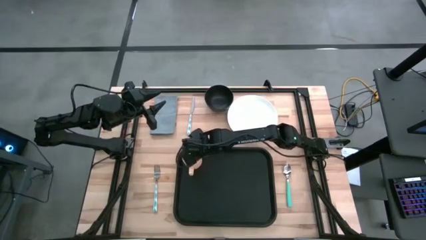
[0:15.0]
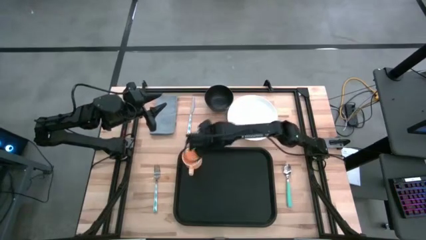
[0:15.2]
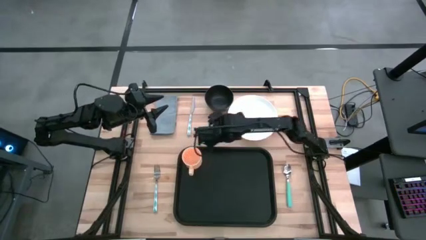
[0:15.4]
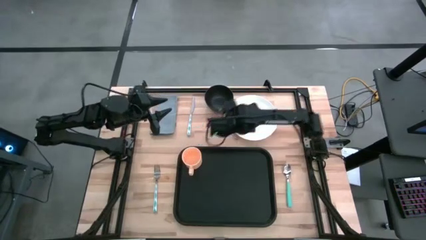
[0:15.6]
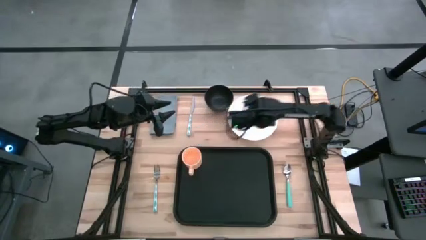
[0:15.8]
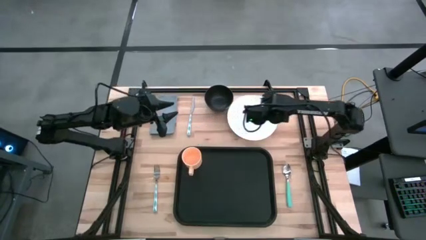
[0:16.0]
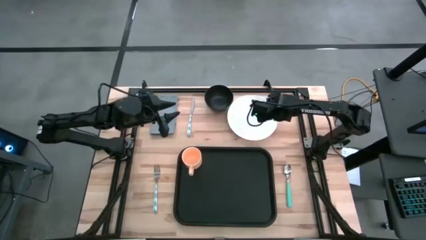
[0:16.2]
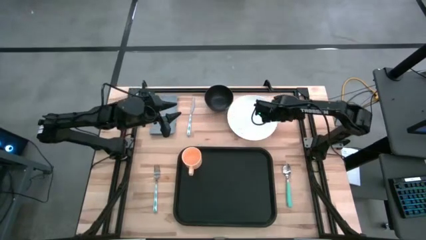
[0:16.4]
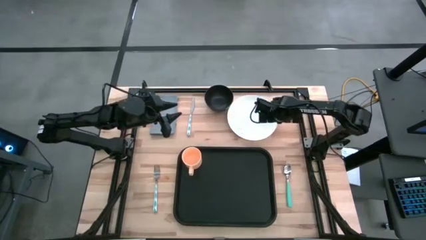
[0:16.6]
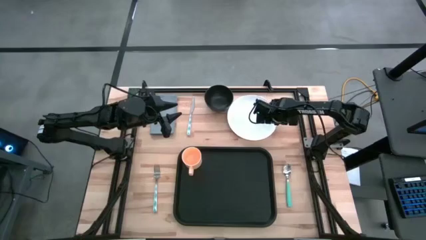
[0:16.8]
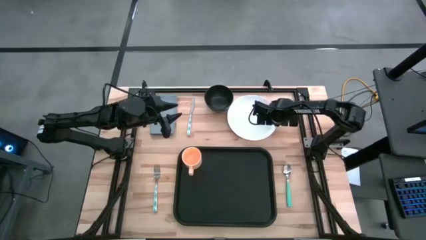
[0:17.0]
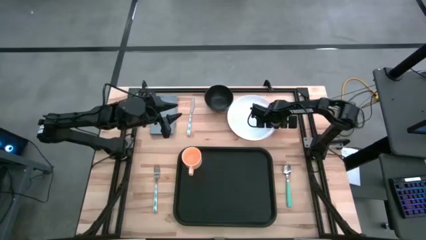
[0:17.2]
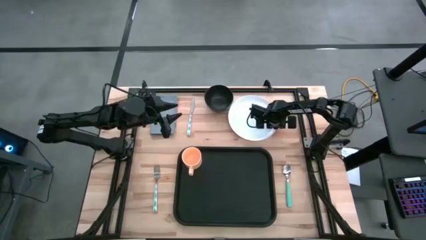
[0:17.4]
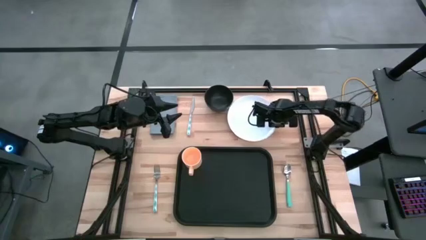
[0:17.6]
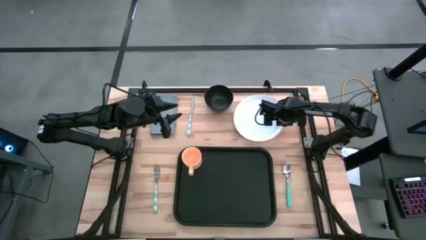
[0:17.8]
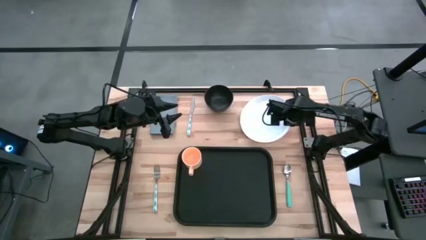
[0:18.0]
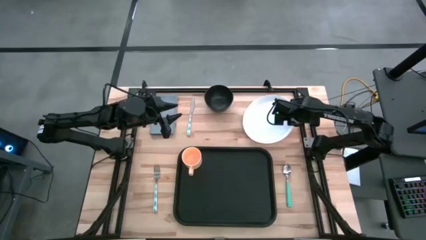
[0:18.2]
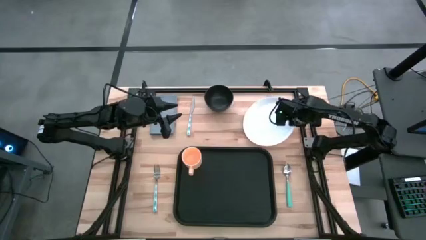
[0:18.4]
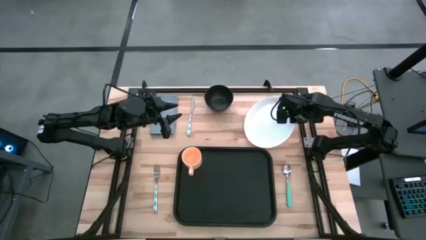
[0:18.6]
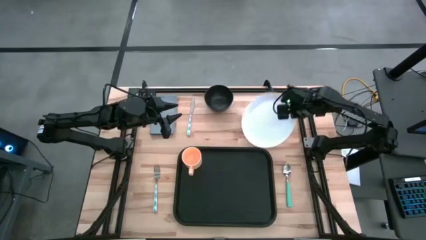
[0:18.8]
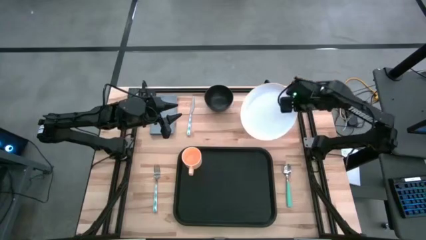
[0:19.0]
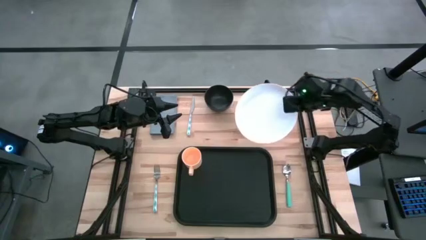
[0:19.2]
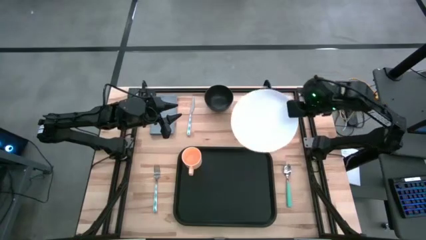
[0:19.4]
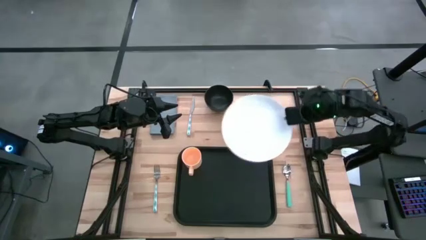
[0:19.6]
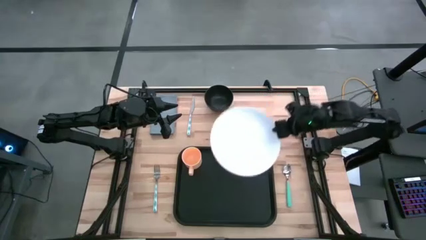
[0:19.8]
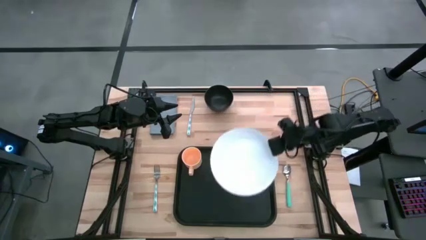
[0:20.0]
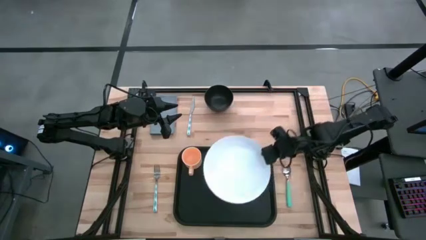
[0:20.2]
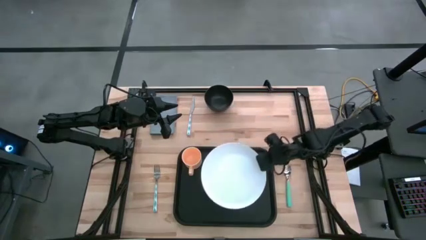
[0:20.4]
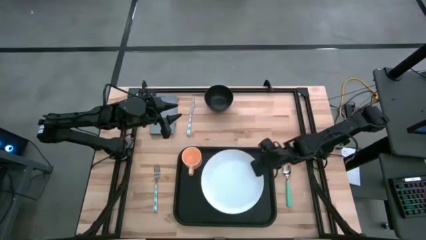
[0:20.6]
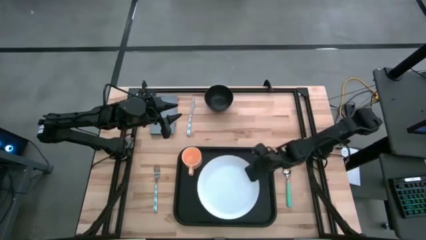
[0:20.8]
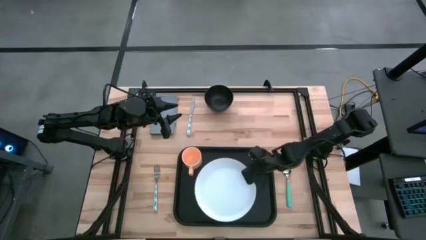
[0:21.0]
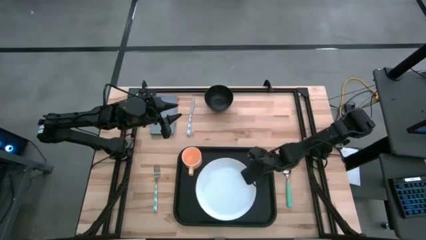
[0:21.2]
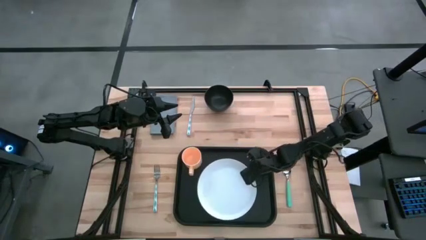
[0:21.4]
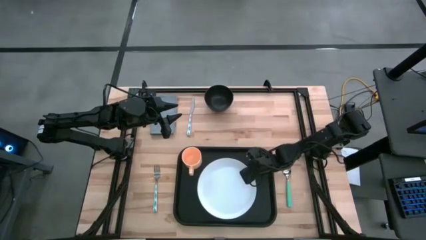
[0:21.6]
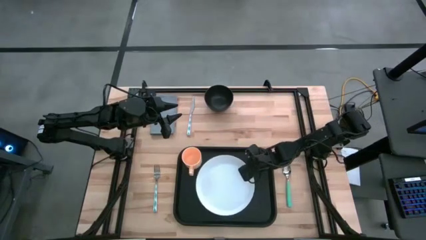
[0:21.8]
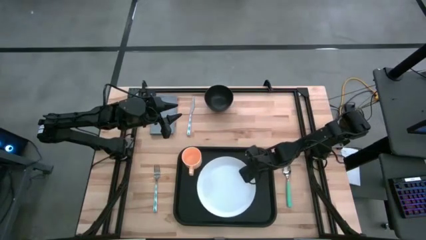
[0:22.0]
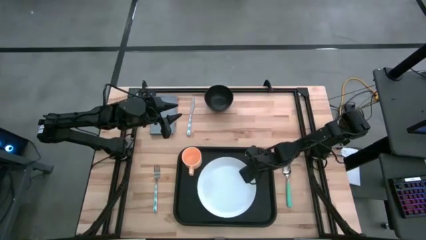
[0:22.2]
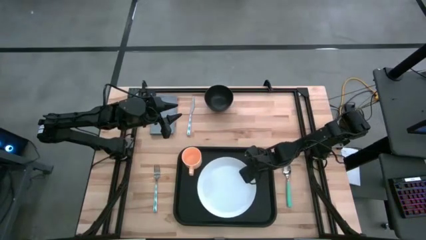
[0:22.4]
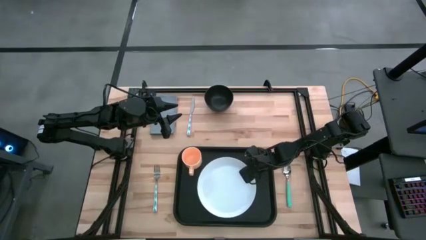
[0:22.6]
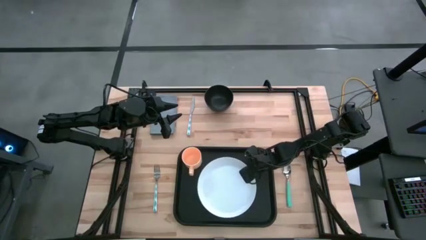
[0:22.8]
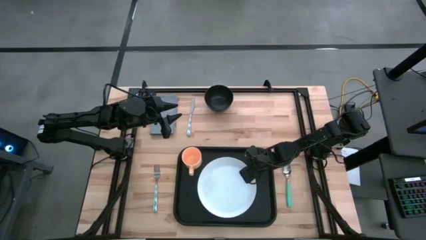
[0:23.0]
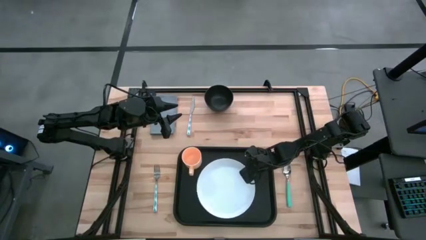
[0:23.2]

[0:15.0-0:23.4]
Task: Set up tray
Put the white plate on the black serving tray to the bottom right side of the orange mug

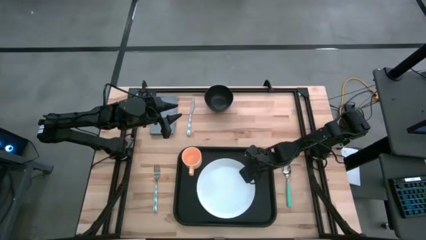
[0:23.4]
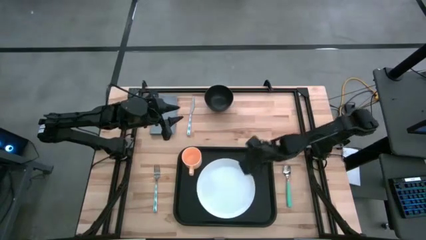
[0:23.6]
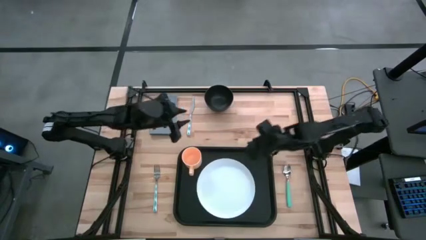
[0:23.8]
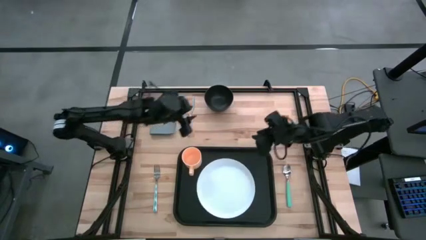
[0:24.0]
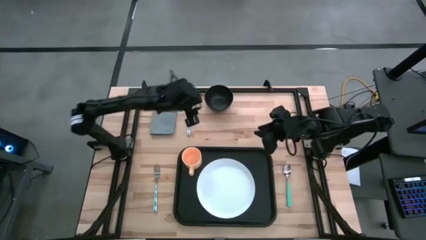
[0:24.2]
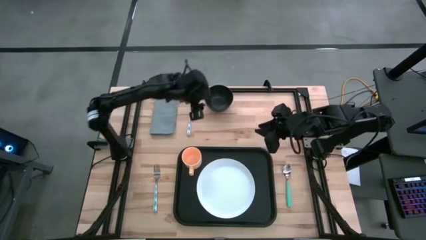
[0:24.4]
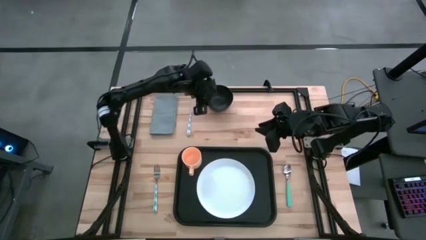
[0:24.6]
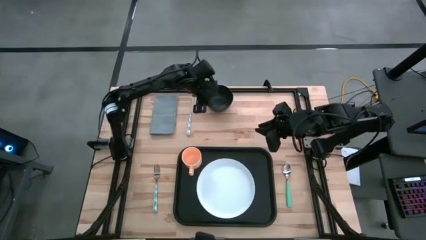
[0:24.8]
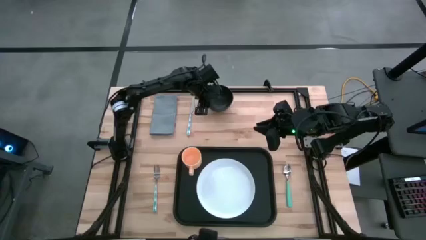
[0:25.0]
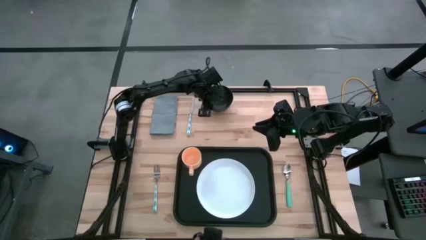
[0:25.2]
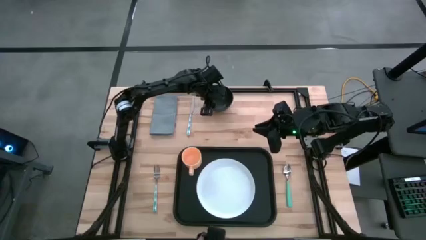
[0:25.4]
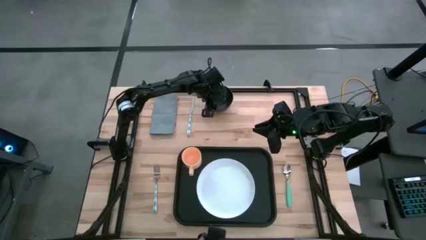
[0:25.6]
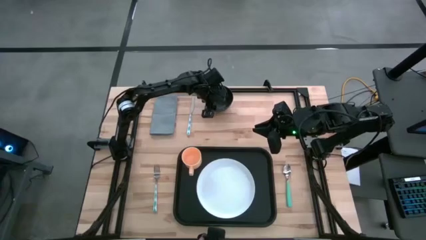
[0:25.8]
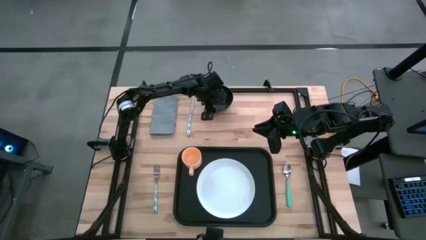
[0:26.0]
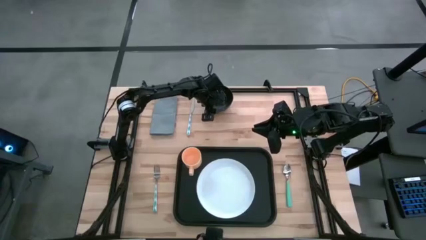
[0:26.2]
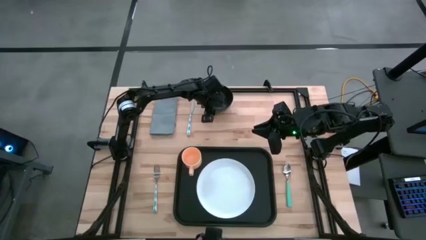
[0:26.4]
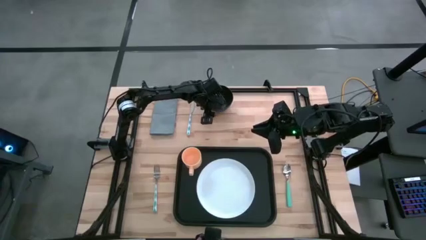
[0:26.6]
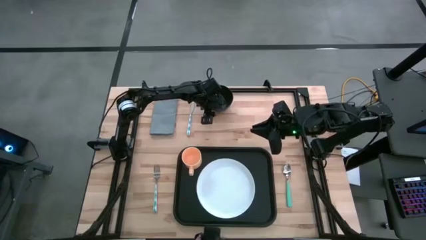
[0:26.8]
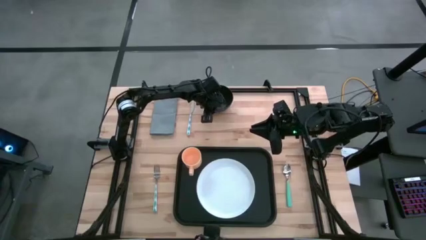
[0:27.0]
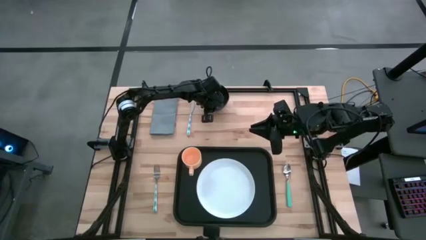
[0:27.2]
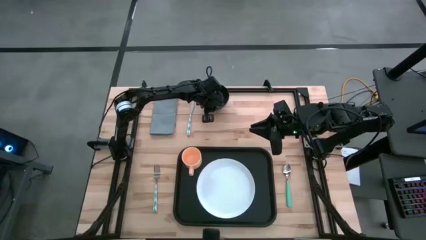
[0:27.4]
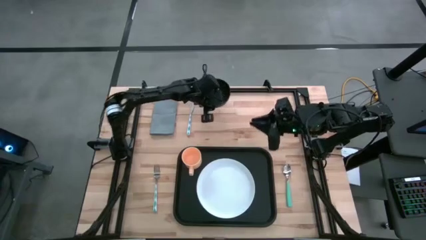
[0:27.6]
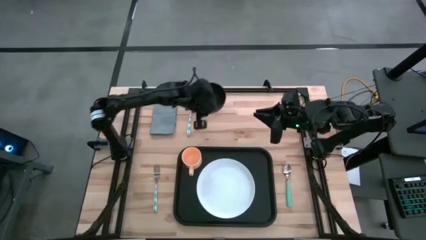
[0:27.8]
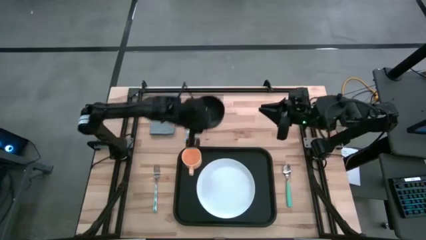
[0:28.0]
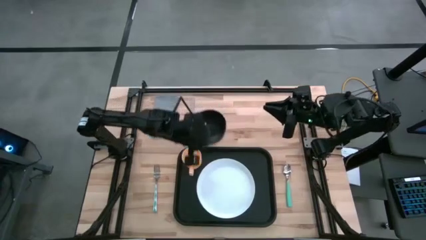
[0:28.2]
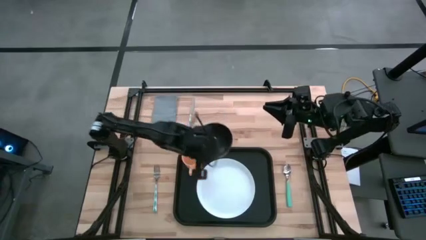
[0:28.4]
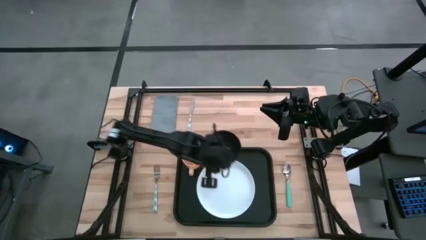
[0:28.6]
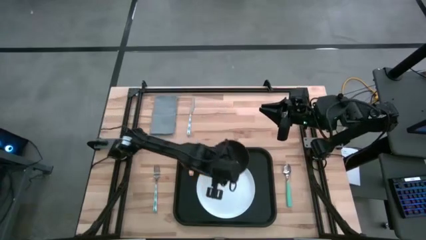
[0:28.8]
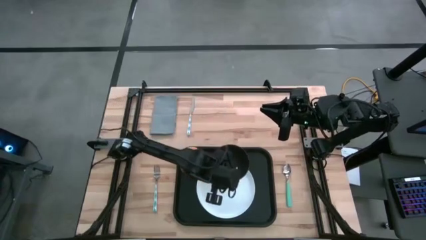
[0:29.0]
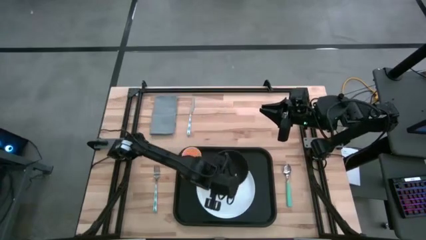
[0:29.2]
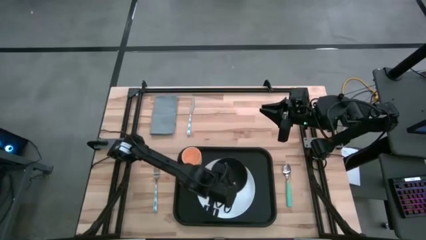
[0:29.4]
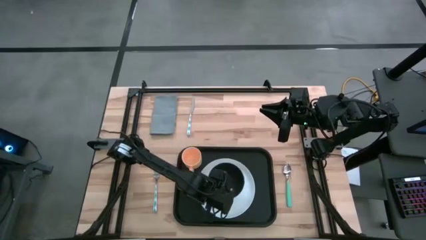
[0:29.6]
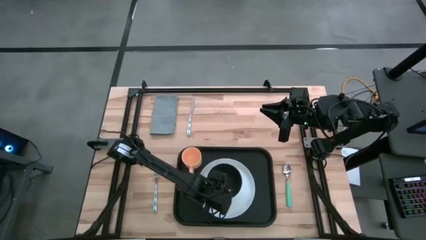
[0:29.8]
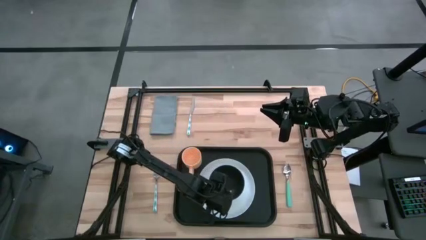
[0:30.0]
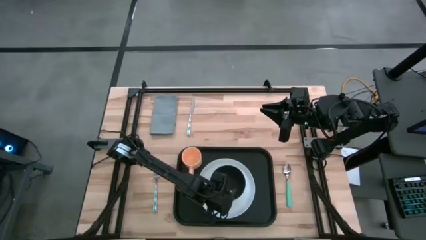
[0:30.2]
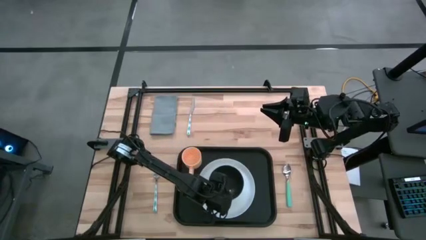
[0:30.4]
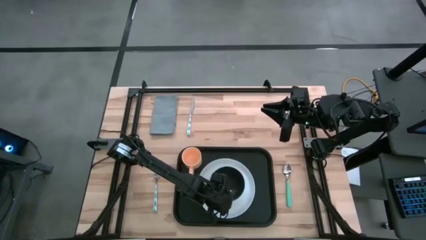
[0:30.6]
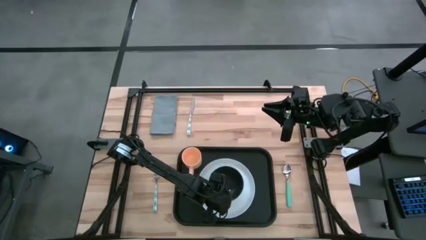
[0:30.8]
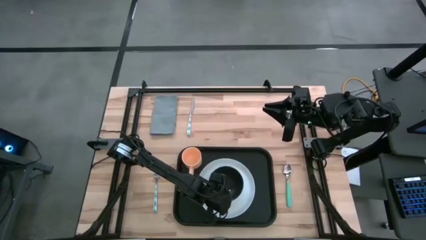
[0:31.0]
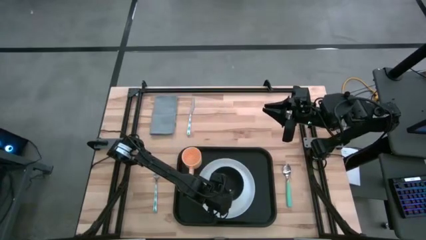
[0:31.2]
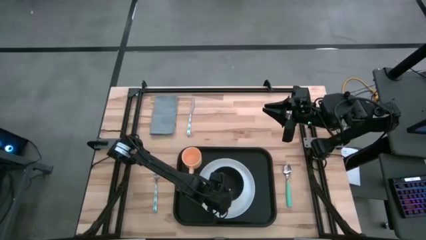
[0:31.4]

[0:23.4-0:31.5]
Put the black bowl on top of the white plate

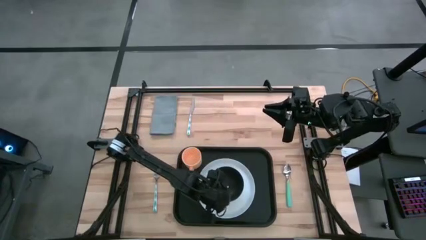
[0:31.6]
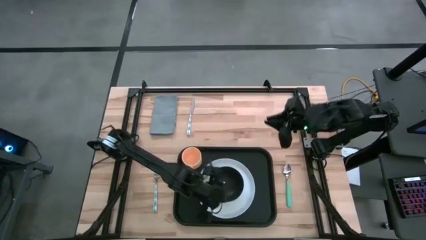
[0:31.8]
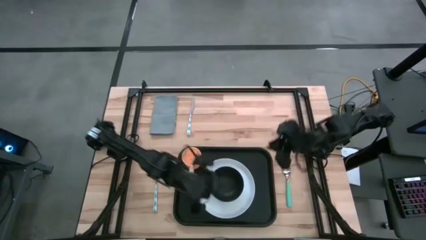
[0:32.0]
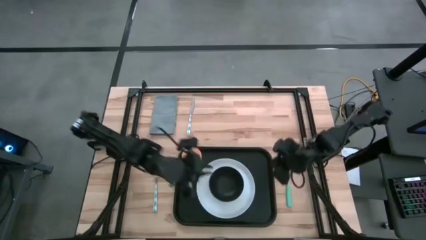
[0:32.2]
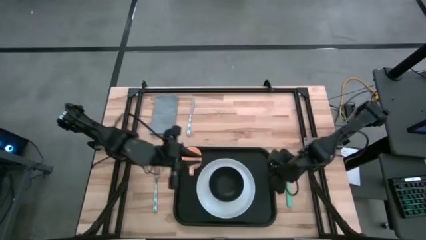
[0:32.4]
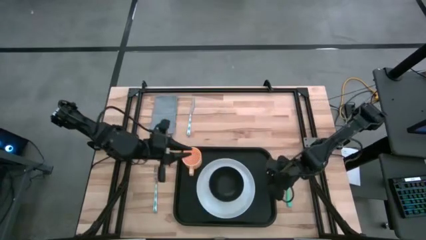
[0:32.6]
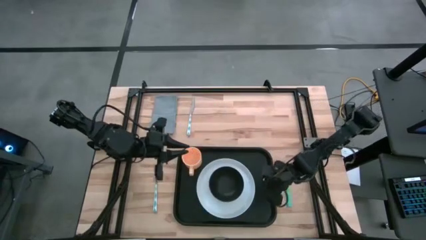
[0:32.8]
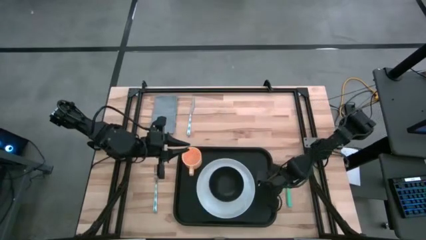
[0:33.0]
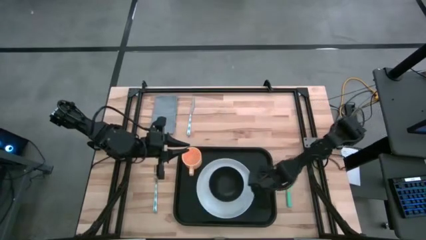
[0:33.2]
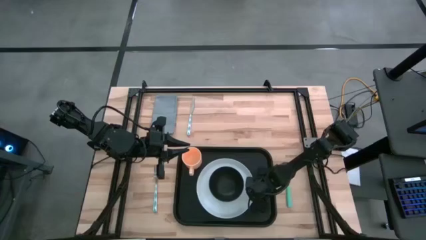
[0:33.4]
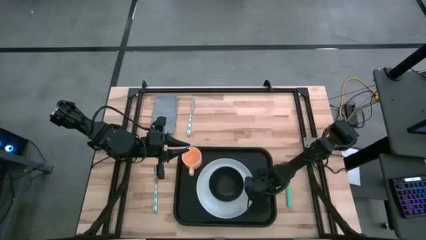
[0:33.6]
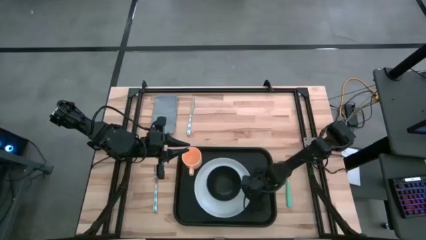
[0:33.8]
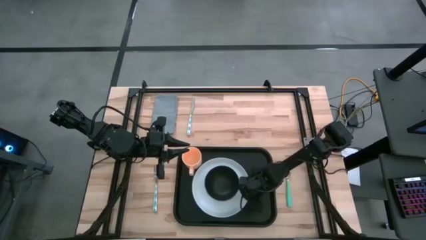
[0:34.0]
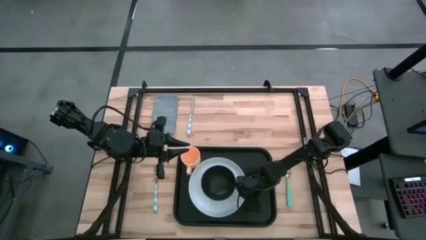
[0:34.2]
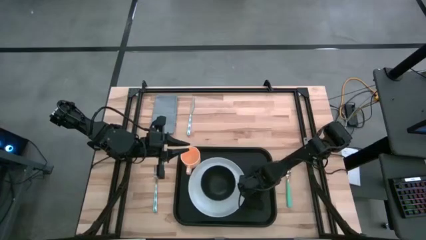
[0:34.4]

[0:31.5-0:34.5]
Adjust the white plate on the black serving tray
